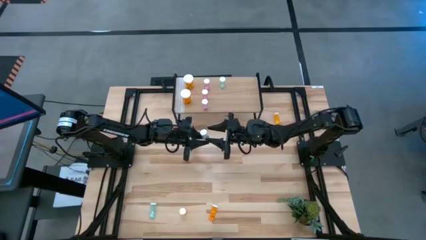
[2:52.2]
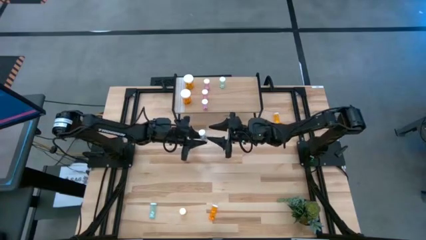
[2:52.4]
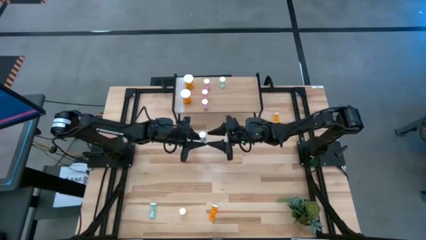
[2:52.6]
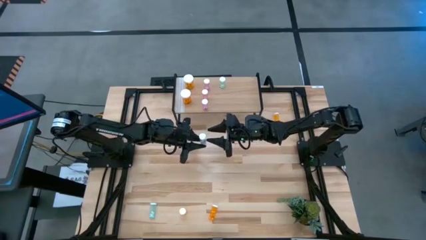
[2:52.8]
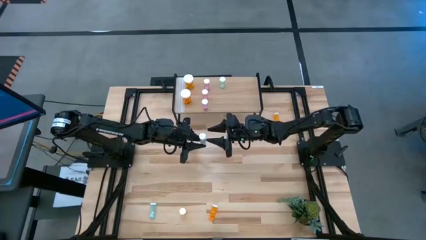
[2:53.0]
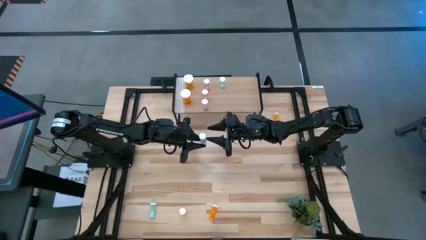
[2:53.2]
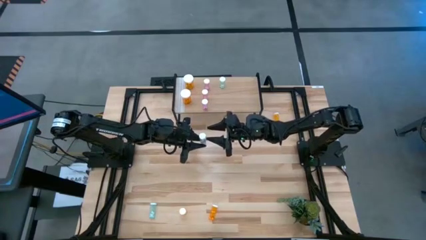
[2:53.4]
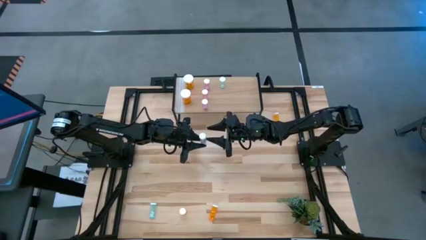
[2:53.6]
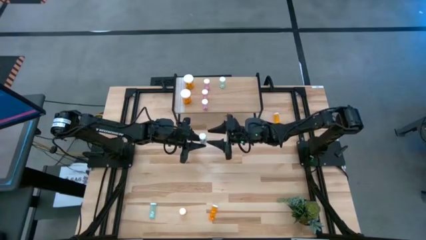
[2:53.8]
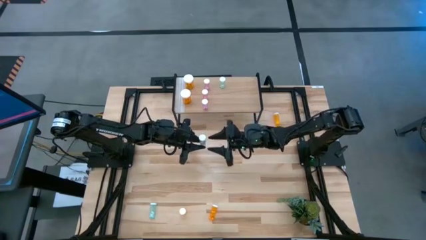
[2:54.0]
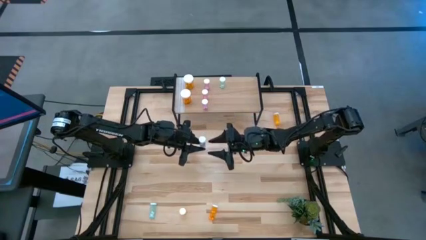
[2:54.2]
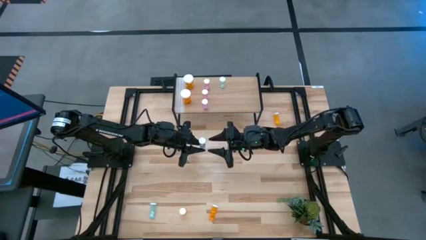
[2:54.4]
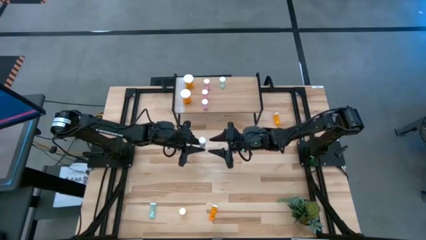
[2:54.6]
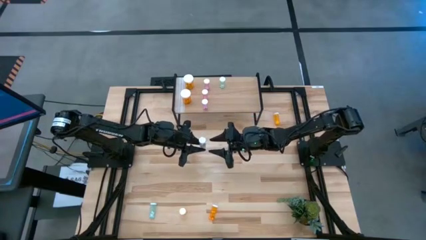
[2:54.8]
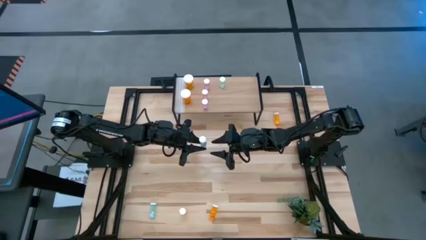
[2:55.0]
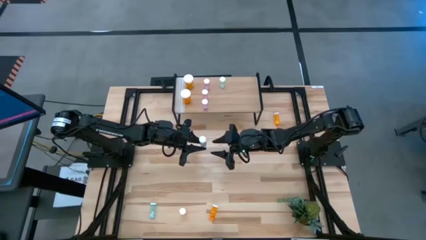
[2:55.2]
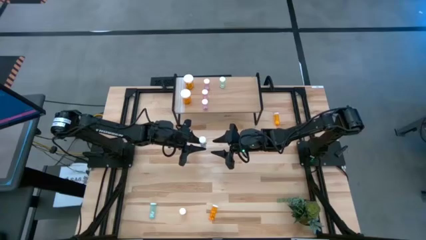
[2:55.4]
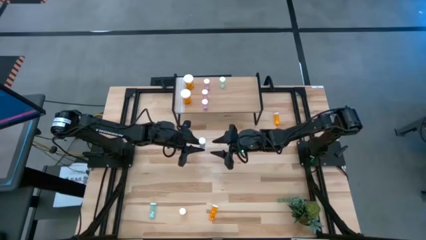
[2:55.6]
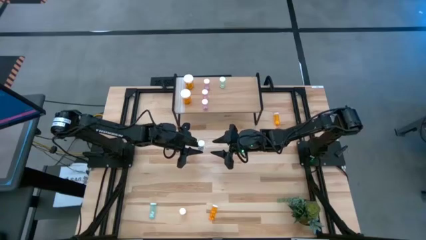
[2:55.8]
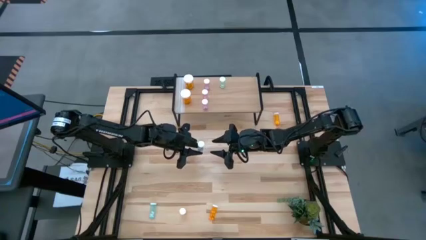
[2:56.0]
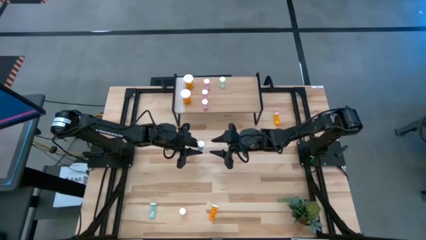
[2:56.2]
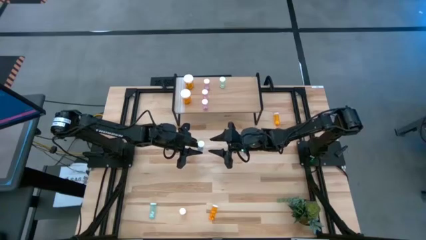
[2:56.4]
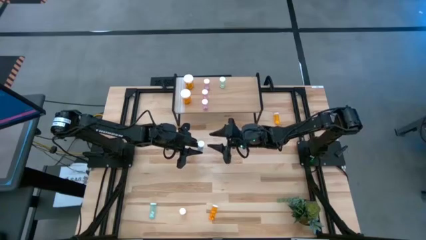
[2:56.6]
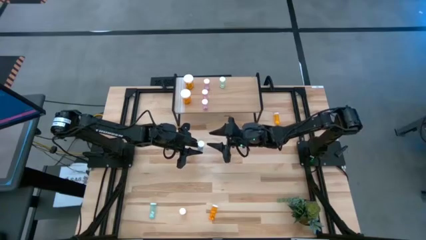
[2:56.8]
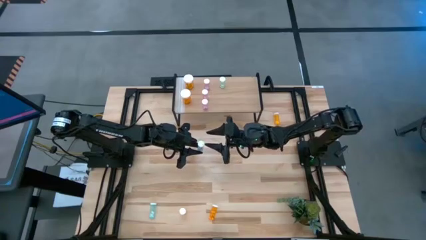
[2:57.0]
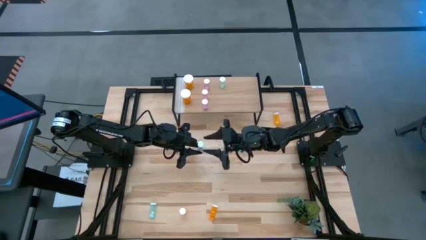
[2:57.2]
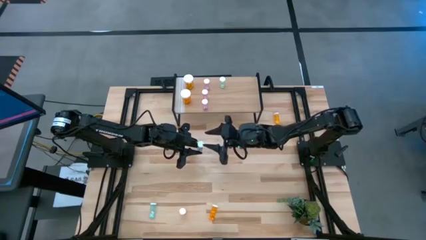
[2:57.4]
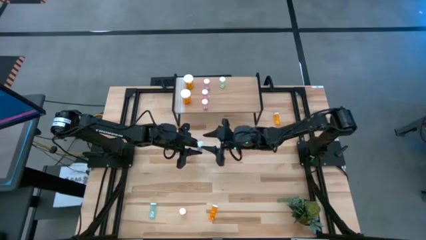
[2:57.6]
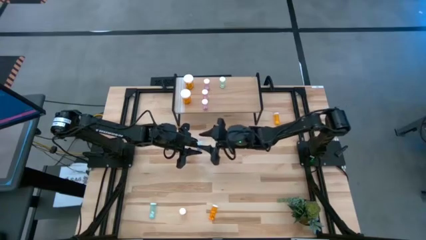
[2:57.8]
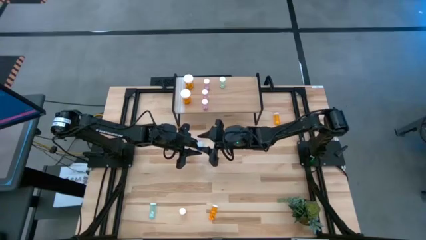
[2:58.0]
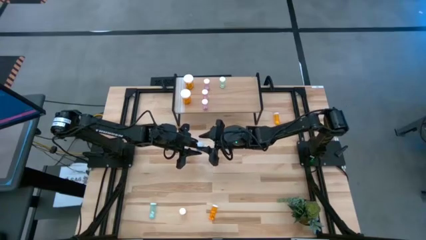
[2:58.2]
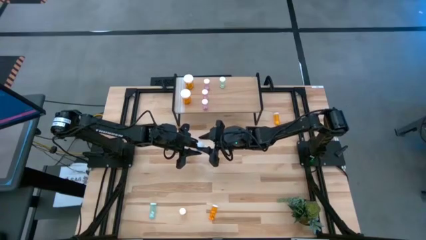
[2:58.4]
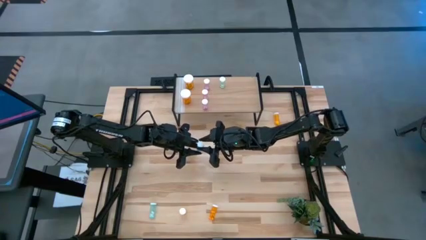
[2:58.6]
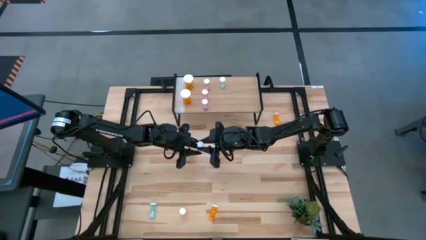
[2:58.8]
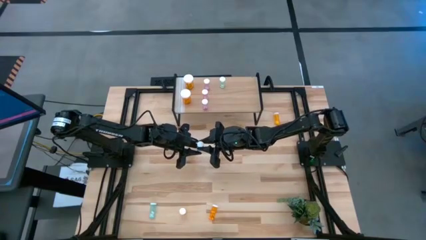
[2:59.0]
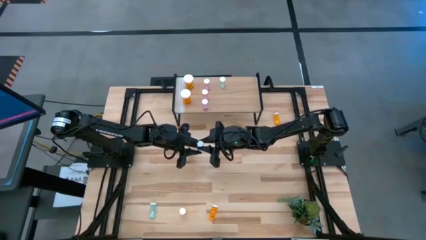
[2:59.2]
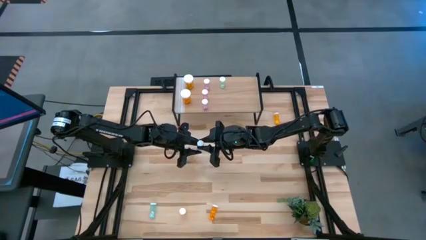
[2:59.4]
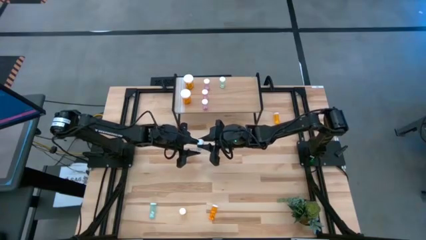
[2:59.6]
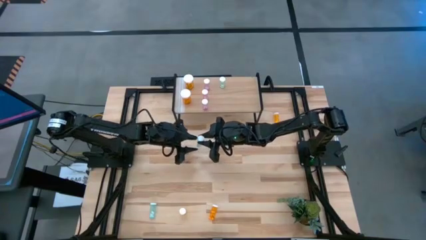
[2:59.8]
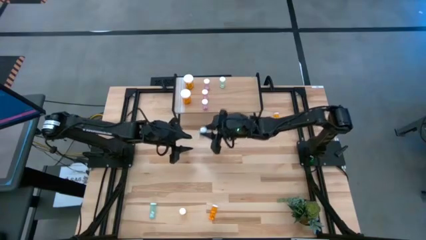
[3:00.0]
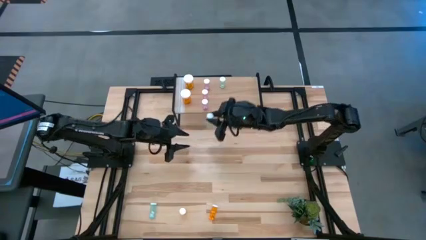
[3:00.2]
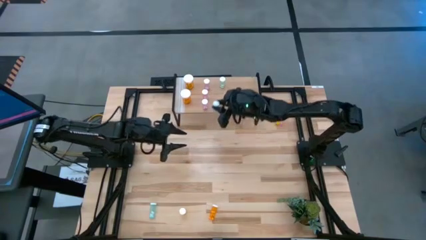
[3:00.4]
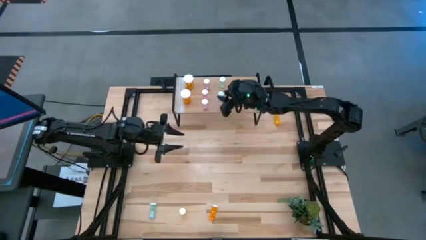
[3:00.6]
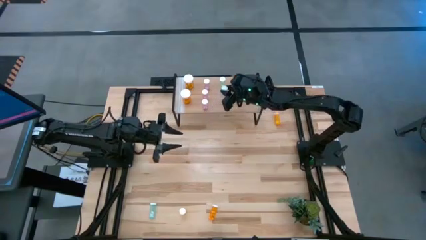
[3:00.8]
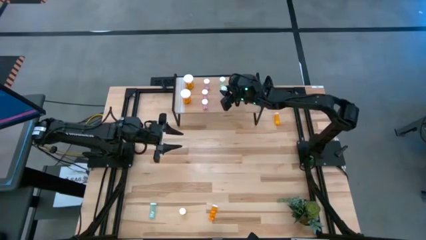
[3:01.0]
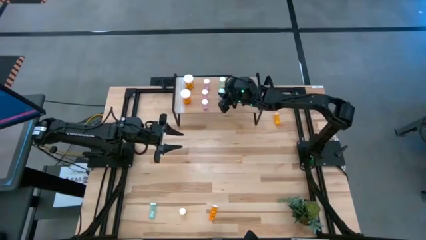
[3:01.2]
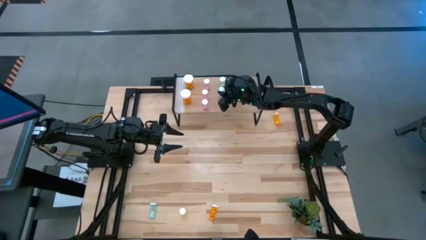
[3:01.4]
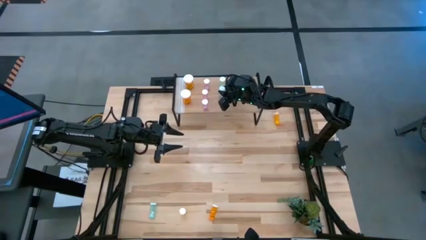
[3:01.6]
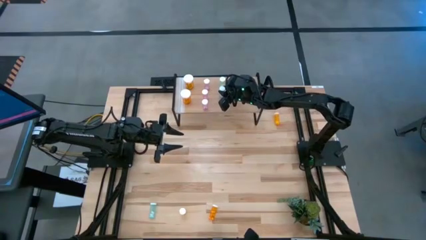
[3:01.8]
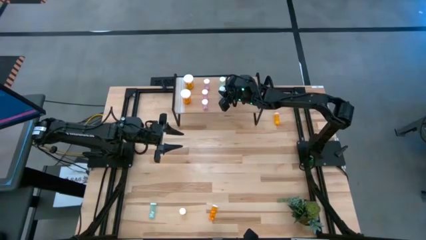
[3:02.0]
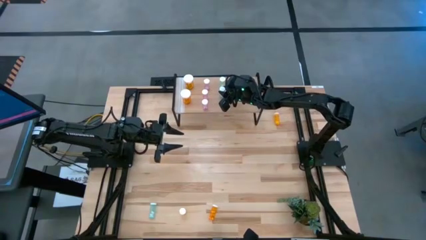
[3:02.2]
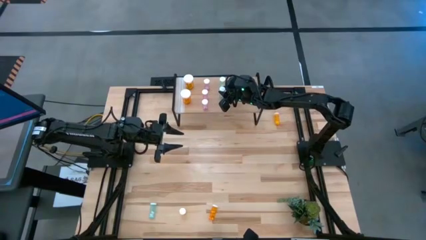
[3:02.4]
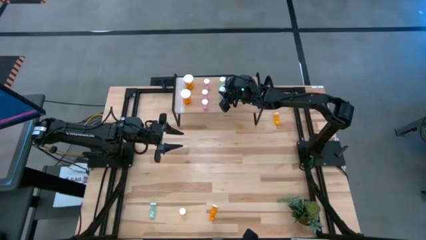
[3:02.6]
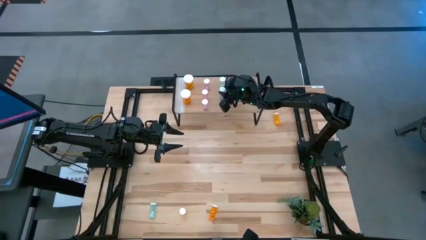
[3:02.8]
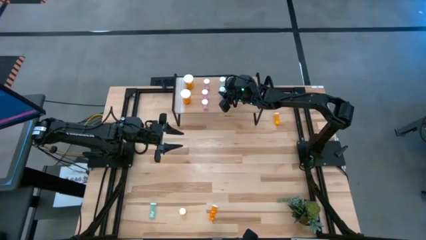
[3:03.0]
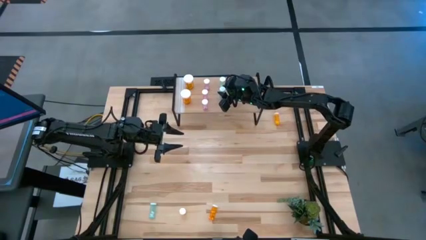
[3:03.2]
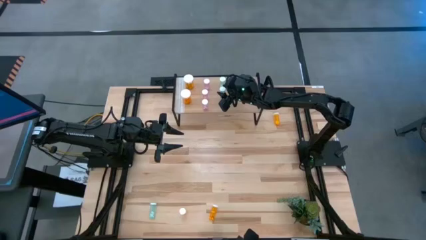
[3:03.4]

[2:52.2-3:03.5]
Task: Pick and place medicine bottles onto shelf by color
Put the top small blue pill bottle aligned with other small blue pill bottle on the shelf

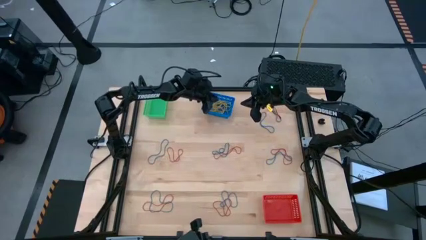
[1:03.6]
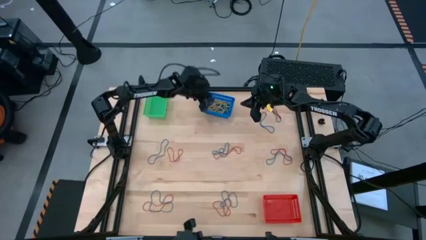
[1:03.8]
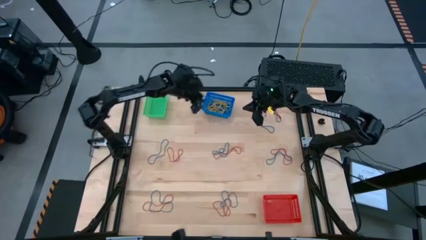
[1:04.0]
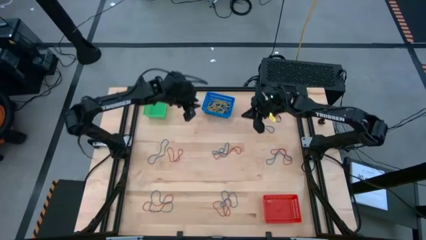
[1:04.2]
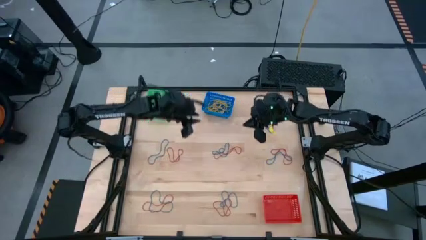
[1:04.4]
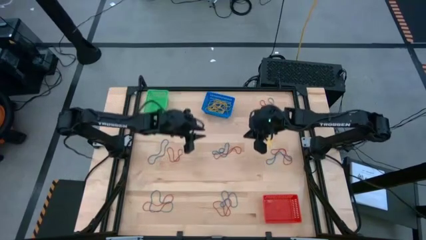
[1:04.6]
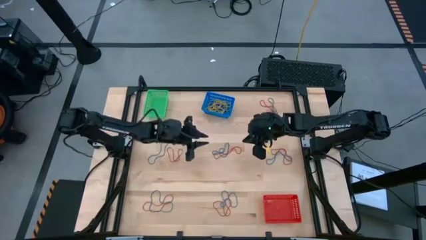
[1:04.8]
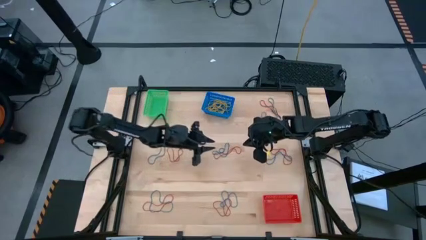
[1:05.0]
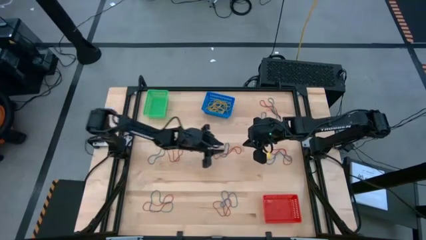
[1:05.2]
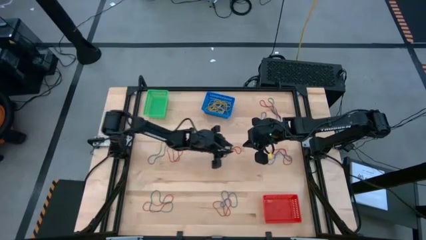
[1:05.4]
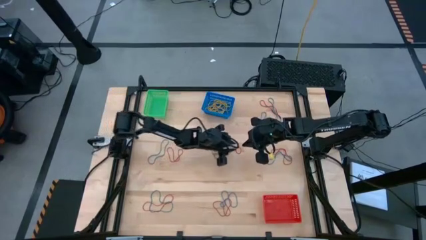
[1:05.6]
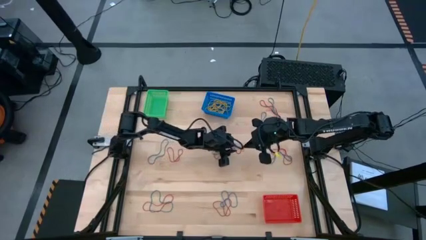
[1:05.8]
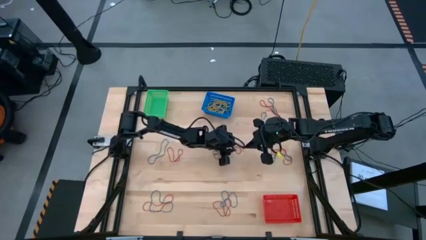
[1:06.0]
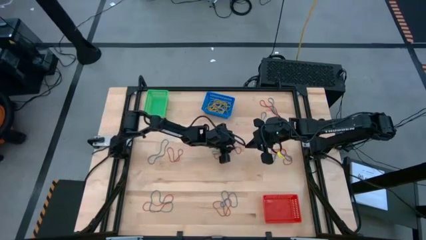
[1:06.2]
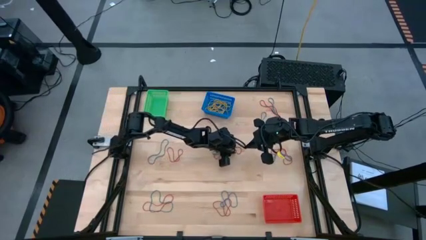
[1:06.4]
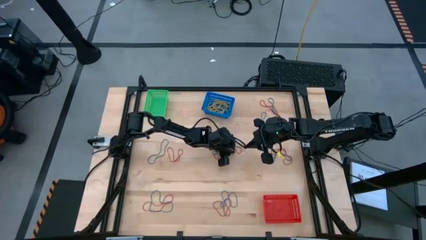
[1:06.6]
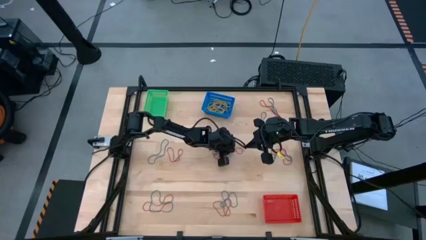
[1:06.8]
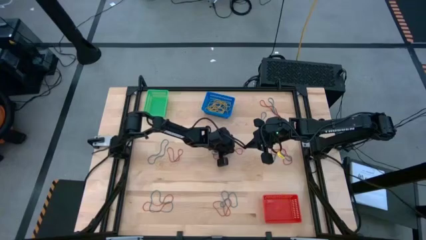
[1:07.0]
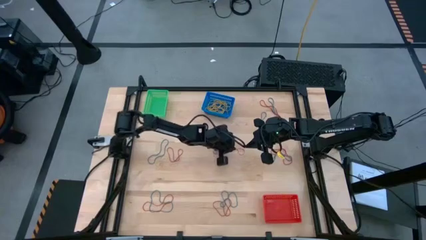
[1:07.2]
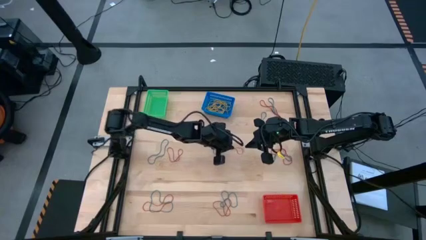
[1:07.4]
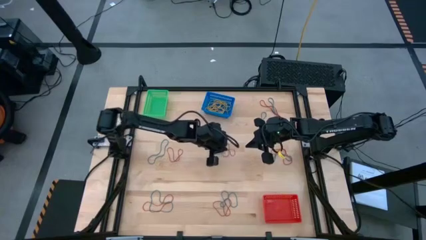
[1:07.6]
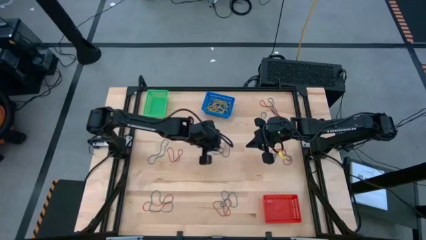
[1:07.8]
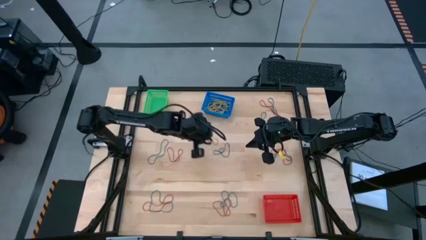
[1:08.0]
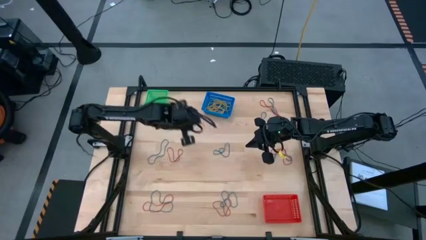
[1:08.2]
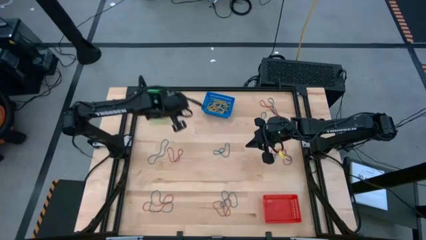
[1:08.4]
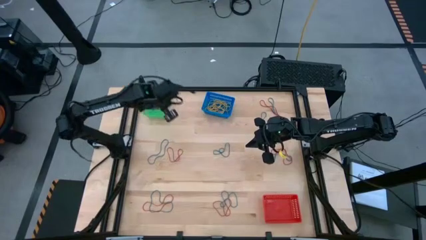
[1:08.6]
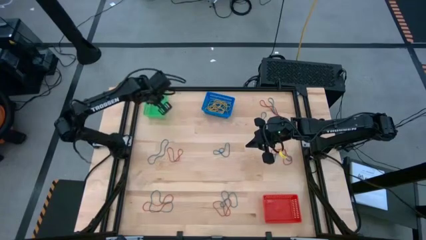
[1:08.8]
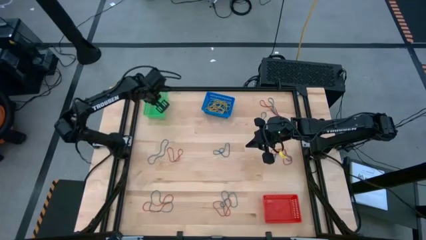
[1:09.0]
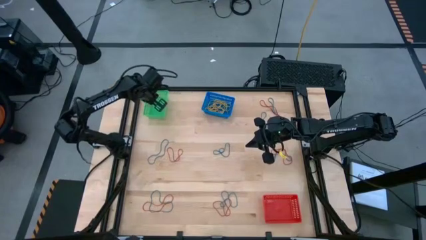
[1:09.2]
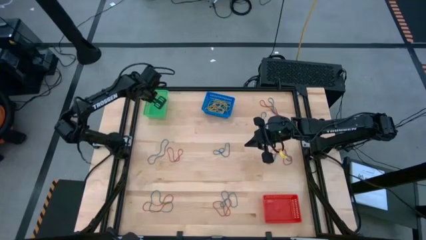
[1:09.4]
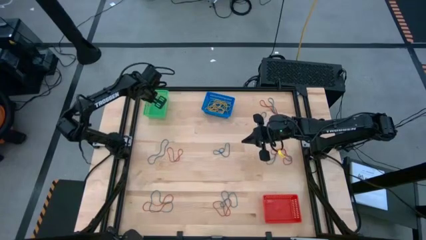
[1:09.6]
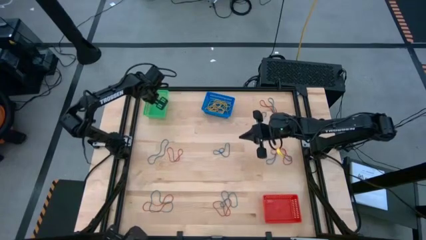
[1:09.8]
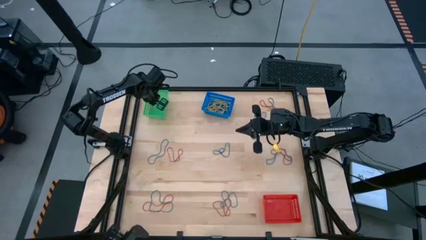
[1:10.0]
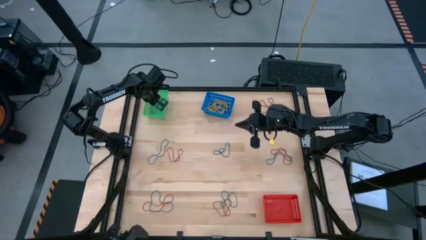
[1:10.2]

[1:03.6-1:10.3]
Task: Sort rubber bands into baskets
Put the red rubber band into the green bin
